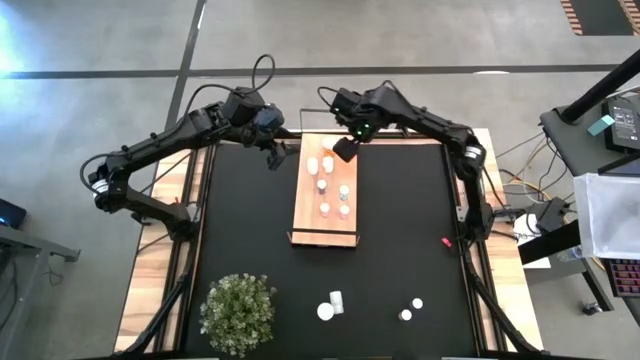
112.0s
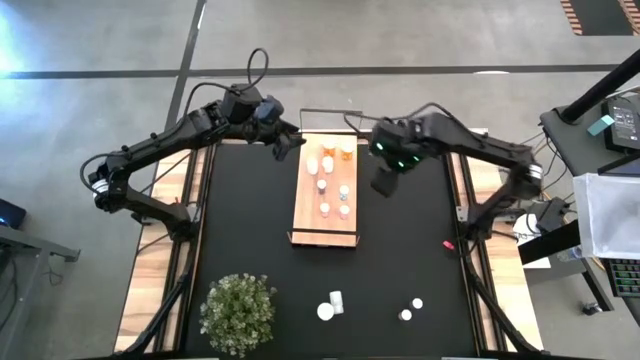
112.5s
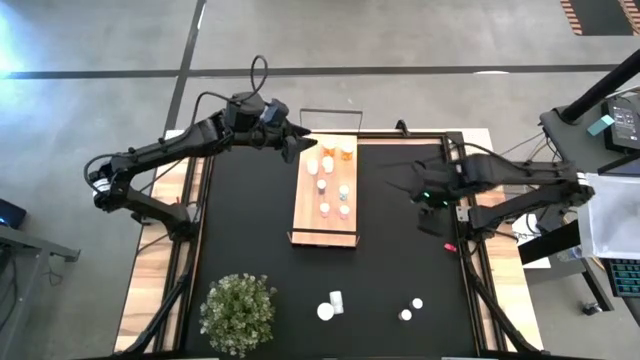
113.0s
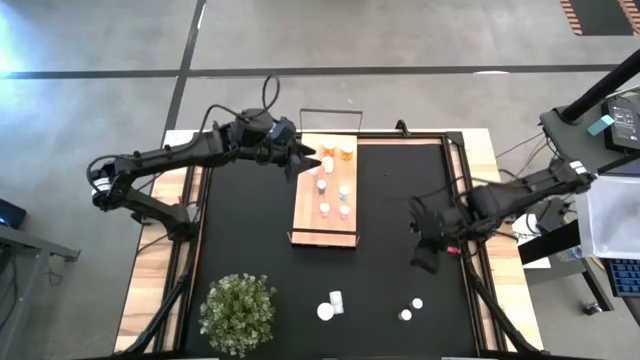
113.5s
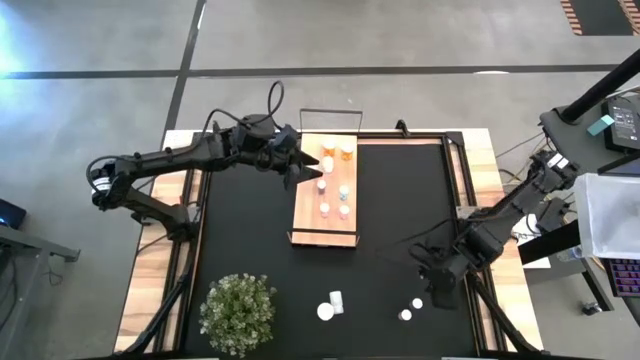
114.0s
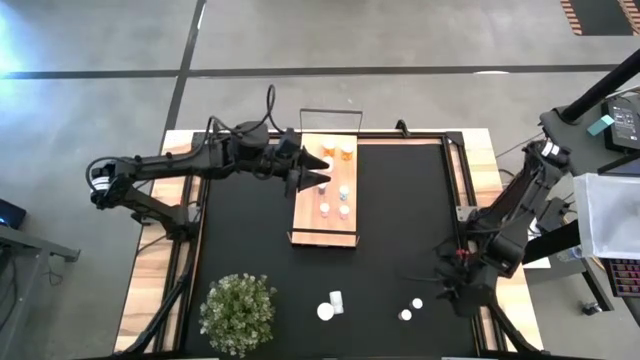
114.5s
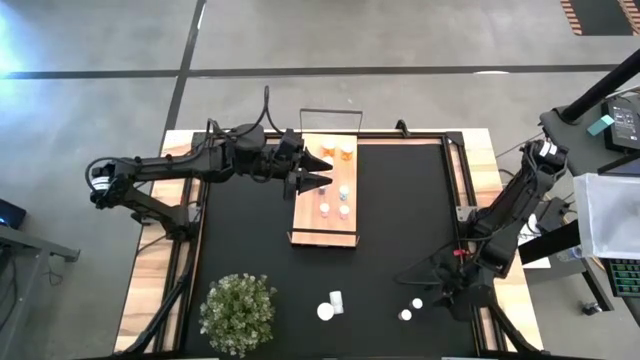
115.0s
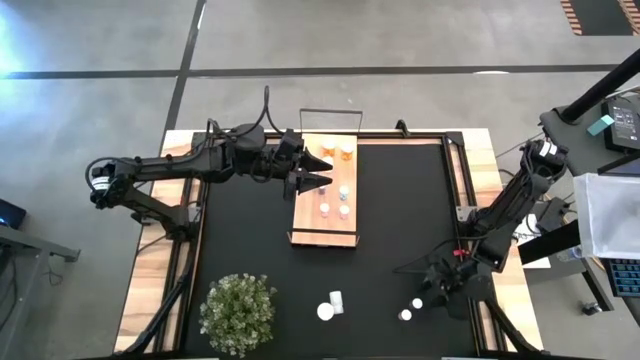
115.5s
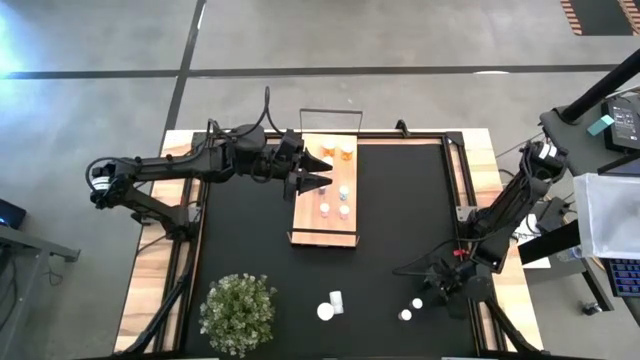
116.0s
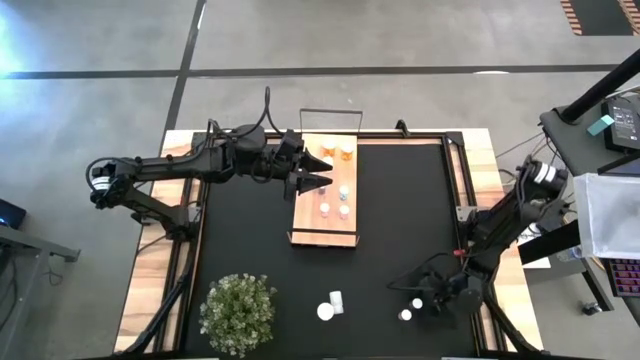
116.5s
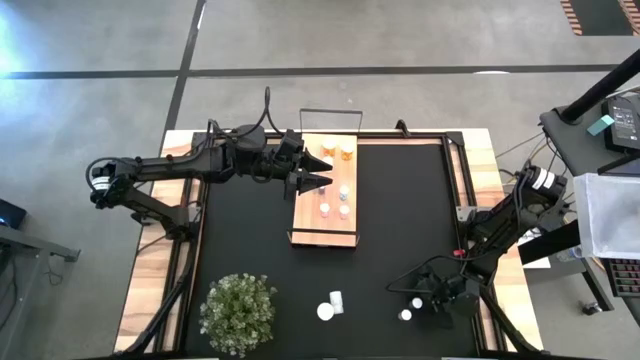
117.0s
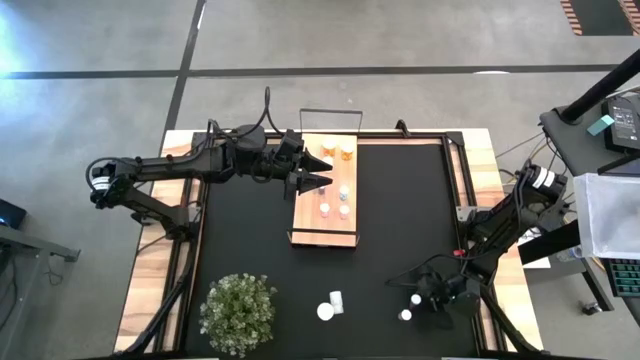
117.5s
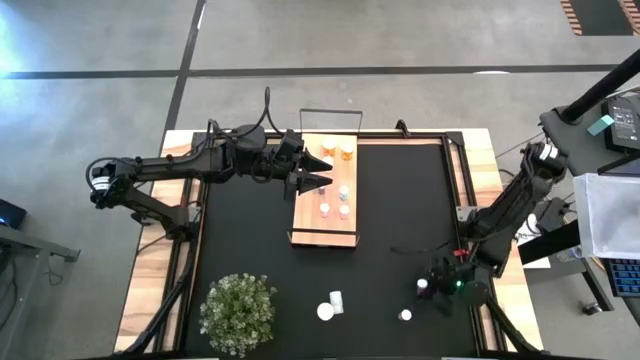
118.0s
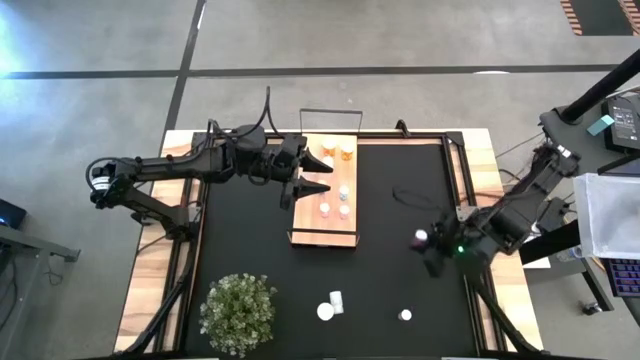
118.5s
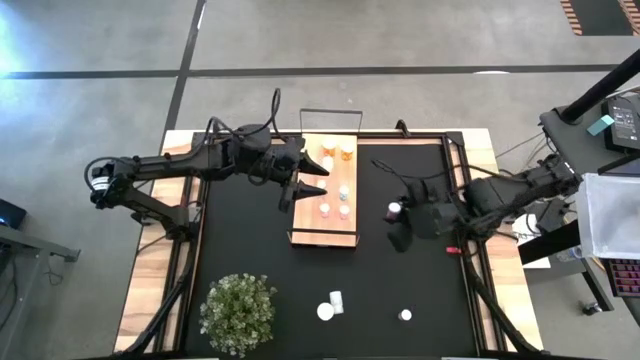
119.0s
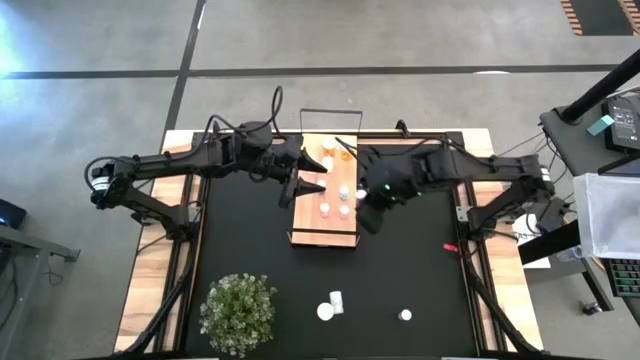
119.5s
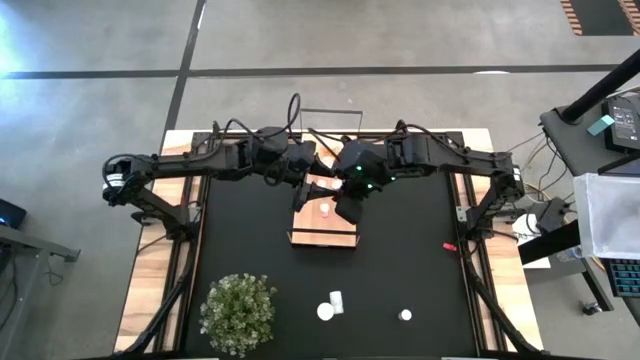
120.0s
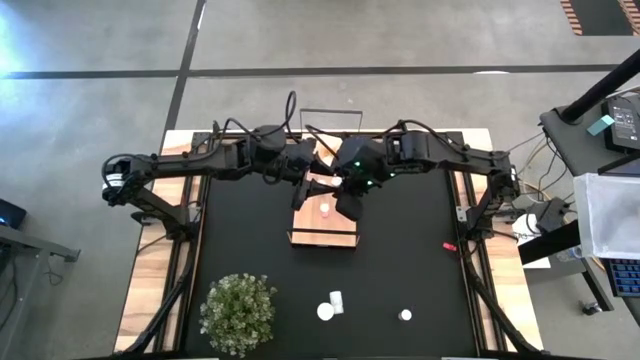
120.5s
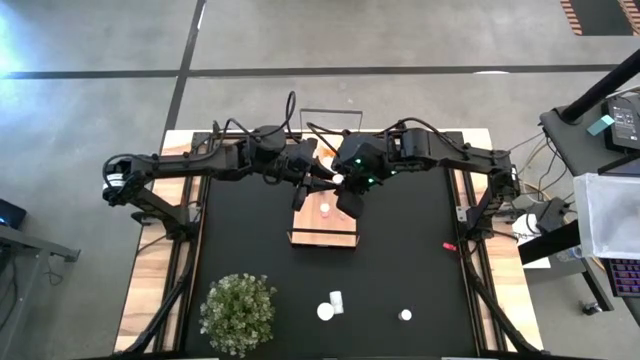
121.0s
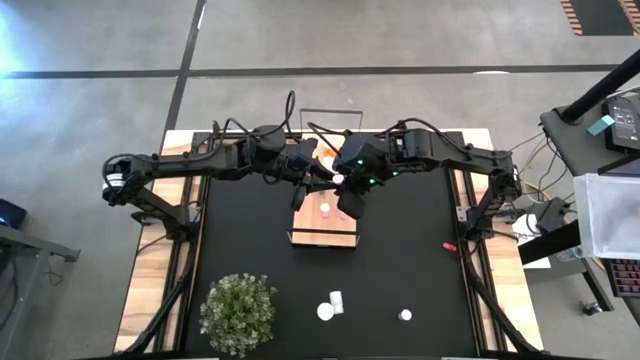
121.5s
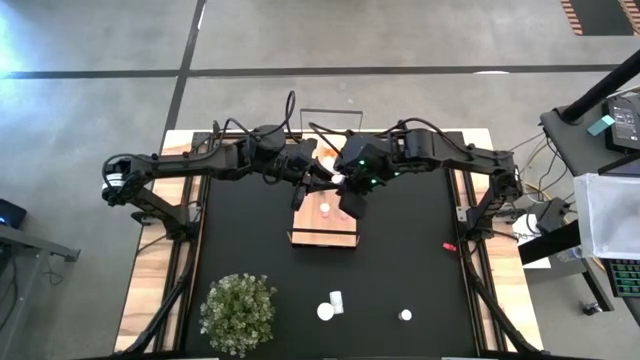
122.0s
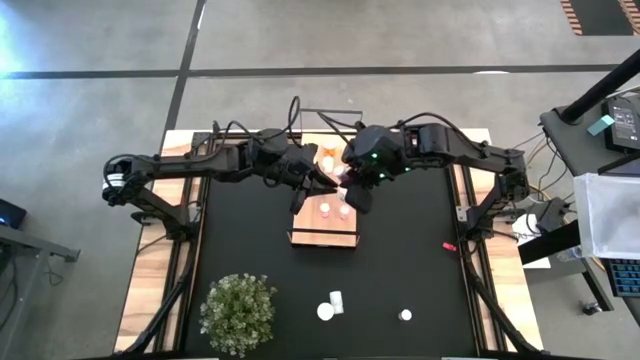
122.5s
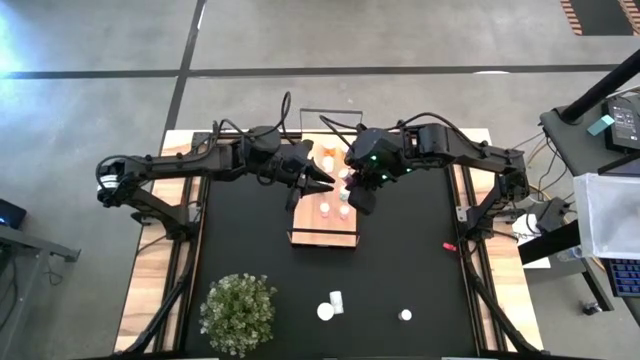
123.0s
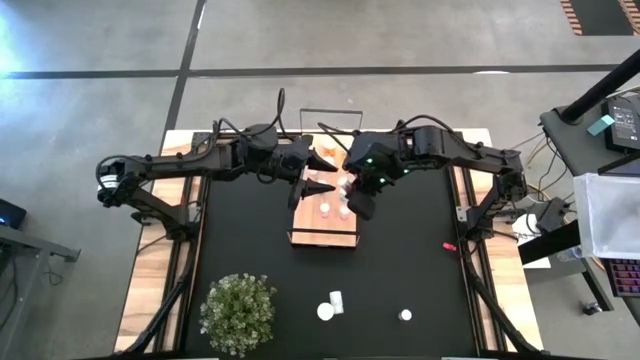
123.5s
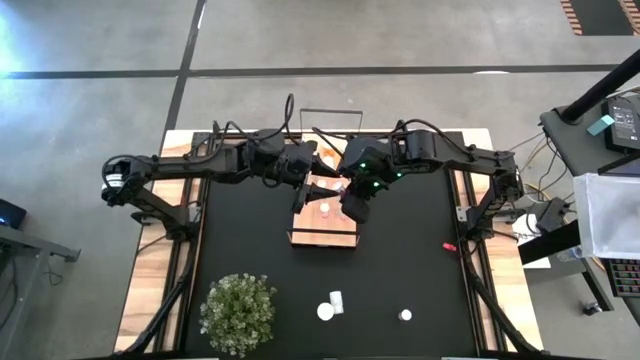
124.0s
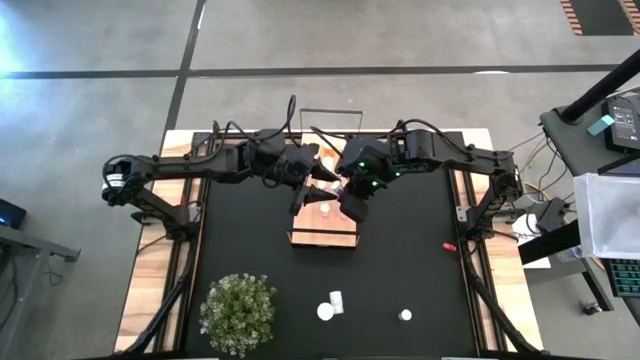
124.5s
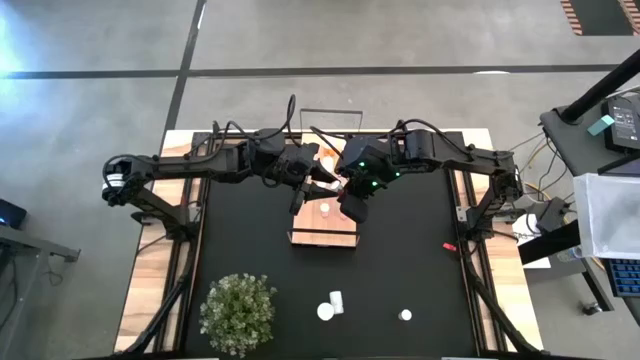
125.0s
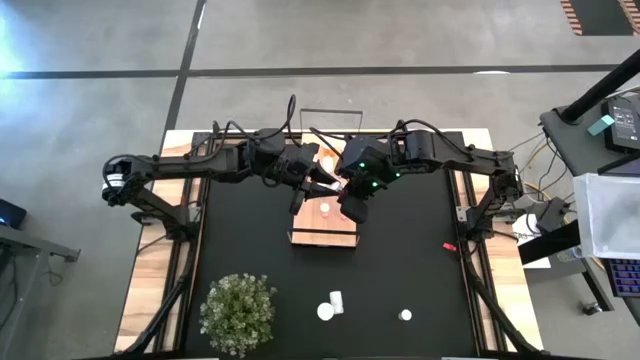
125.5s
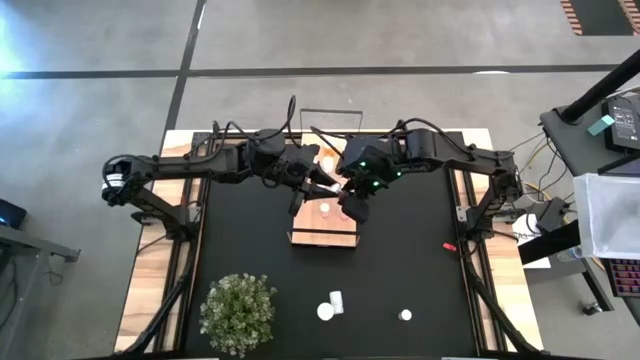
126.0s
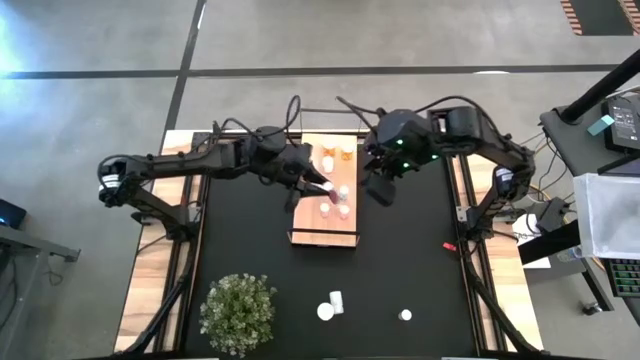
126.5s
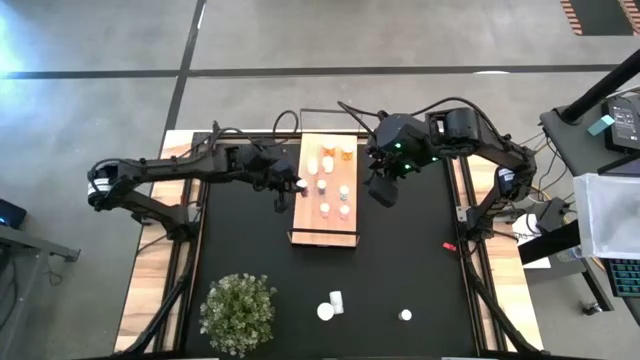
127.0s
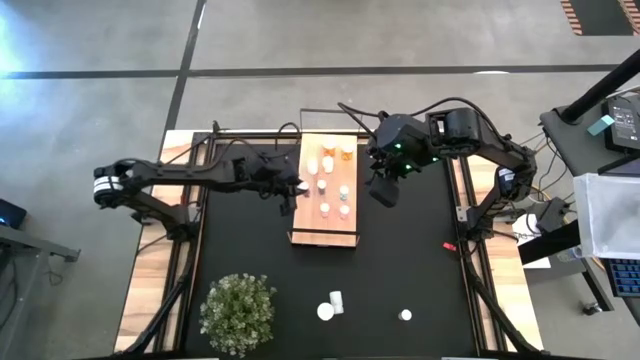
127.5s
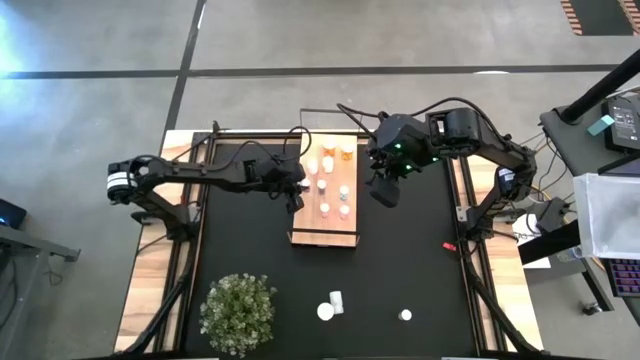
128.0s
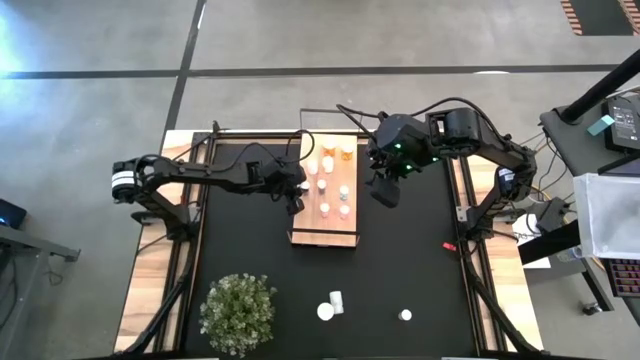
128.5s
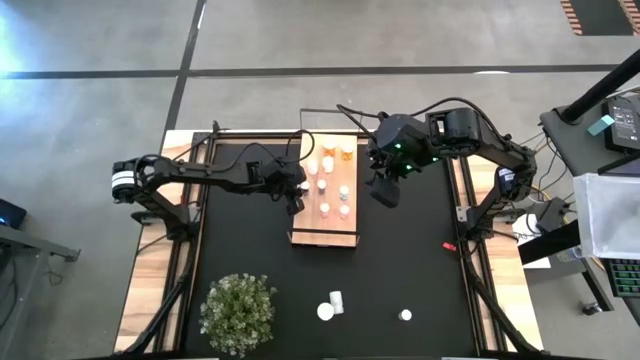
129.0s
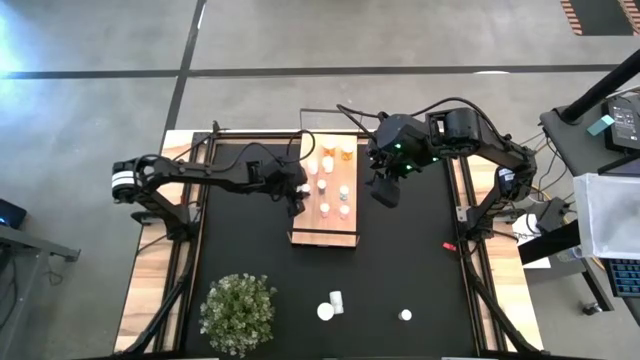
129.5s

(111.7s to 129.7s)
Task: Pick and place medicine bottles onto shelf by color
Put the blue pill bottle on the shelf aligned with the other blue pill bottle

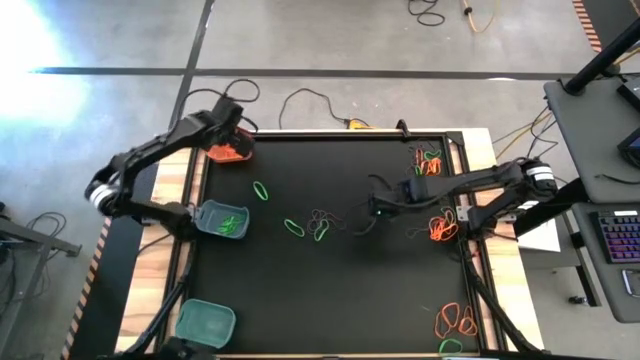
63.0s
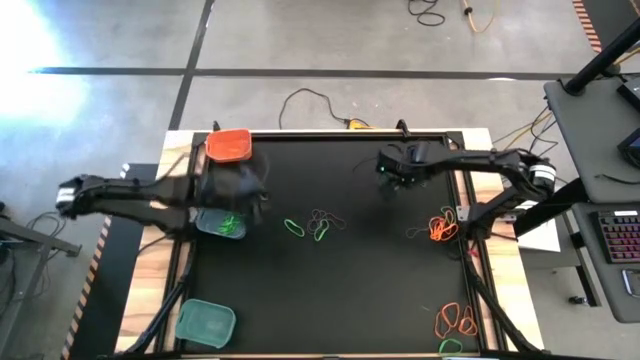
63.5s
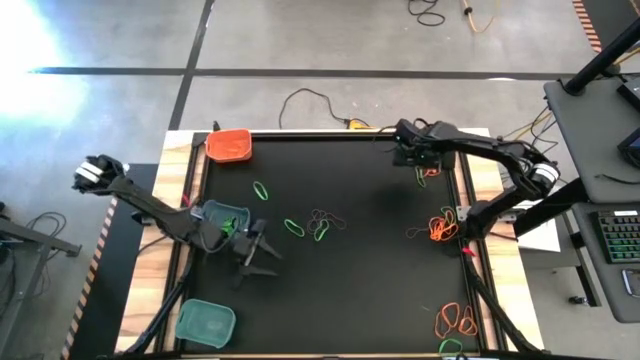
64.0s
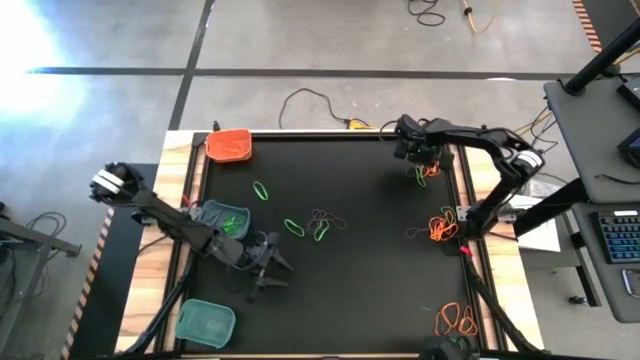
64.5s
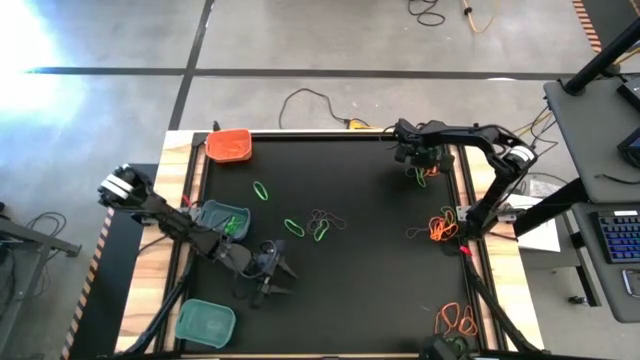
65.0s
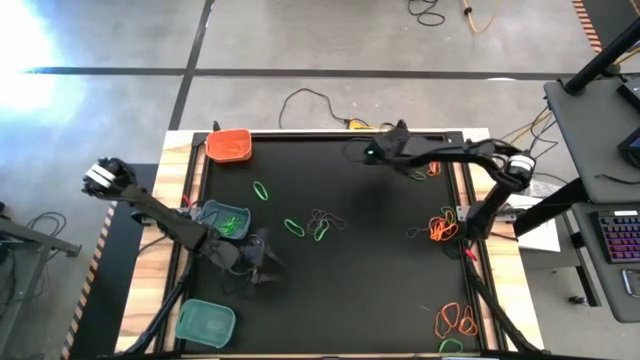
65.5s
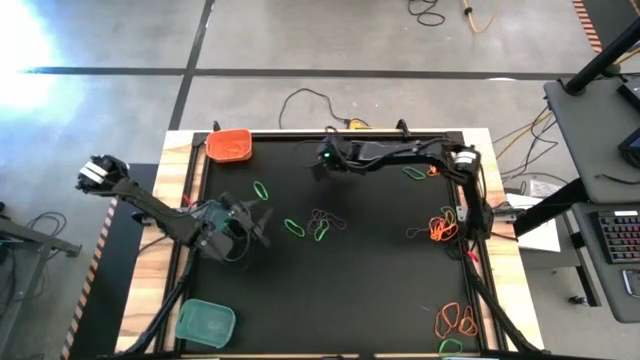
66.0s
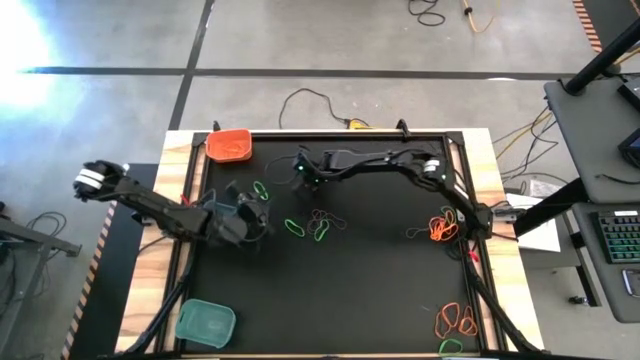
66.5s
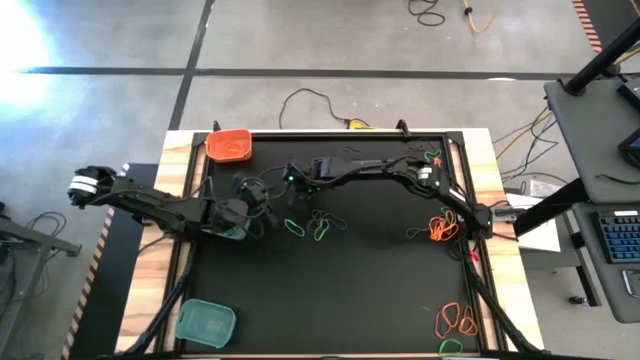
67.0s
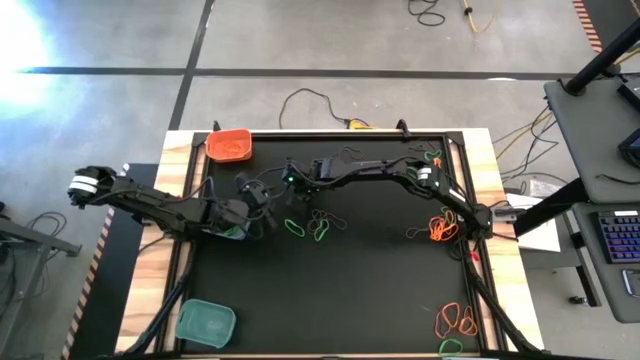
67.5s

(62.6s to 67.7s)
Task: Sort rubber bands into baskets
Put the orange rubber band into the orange bin
